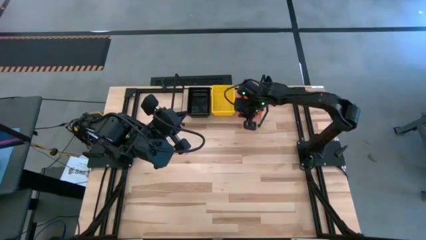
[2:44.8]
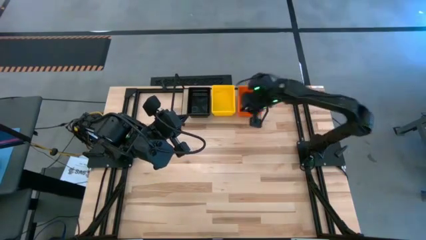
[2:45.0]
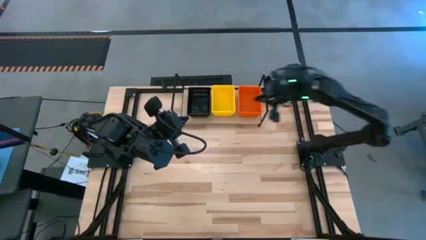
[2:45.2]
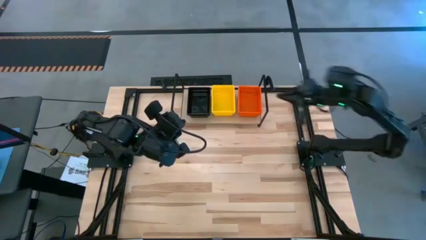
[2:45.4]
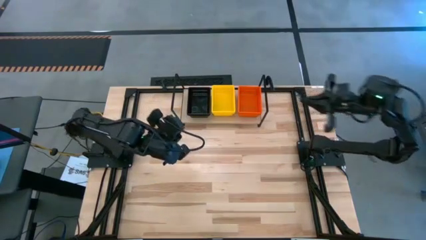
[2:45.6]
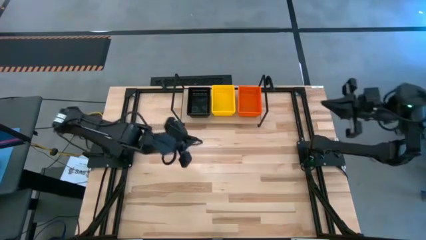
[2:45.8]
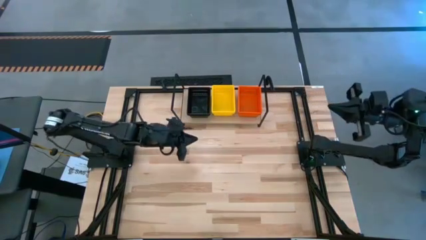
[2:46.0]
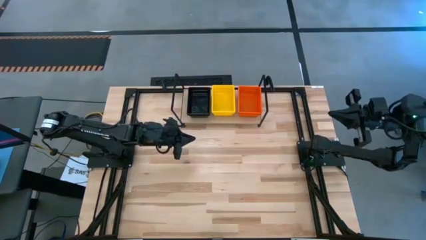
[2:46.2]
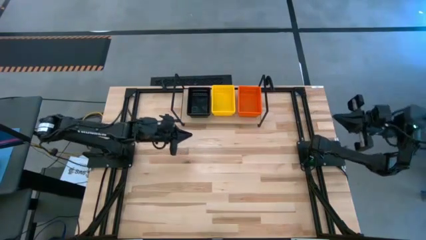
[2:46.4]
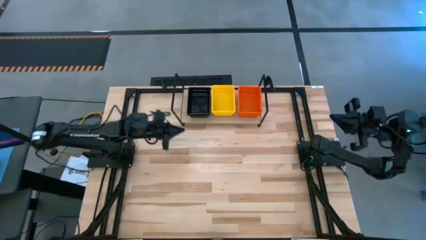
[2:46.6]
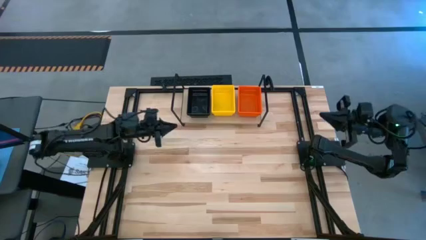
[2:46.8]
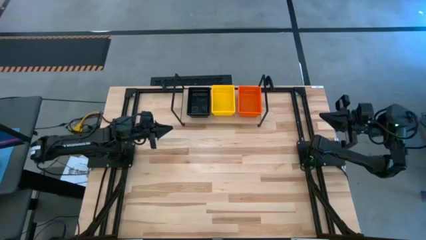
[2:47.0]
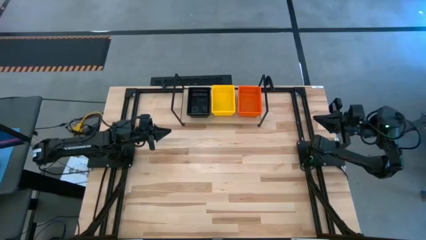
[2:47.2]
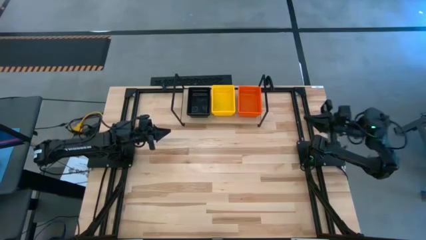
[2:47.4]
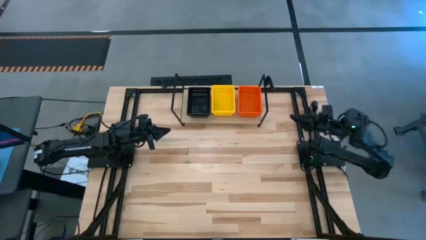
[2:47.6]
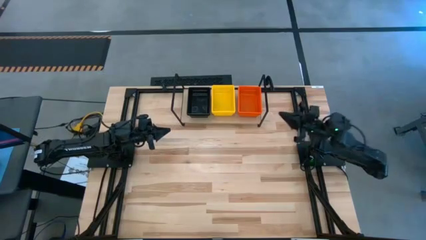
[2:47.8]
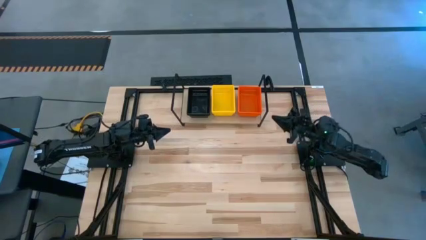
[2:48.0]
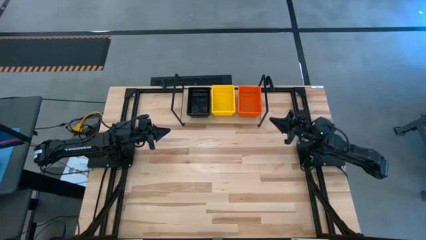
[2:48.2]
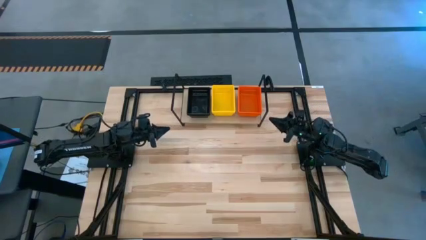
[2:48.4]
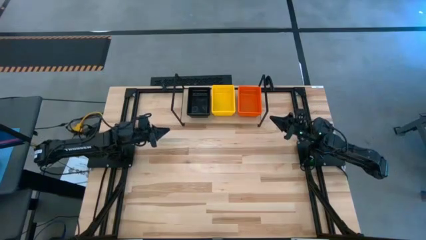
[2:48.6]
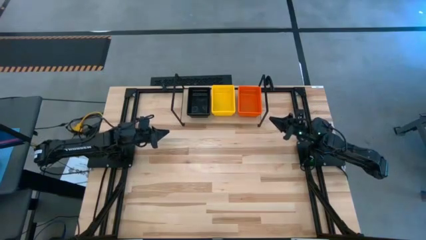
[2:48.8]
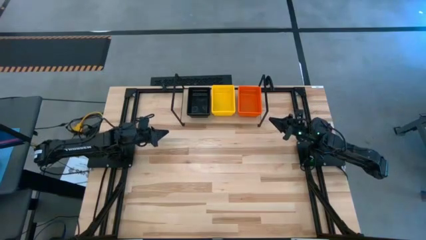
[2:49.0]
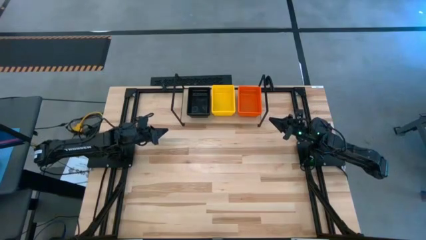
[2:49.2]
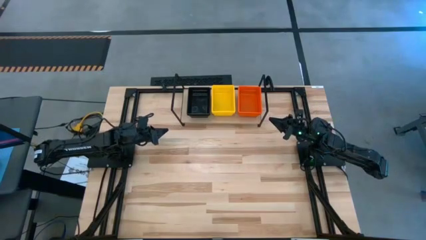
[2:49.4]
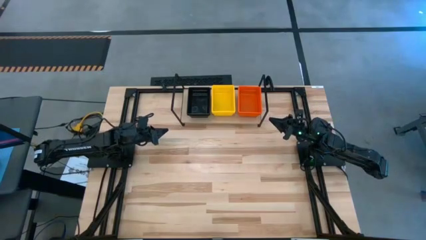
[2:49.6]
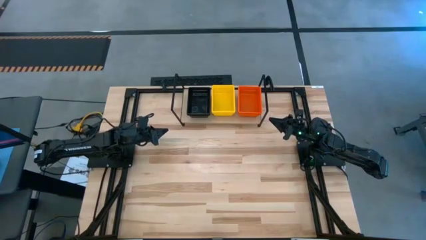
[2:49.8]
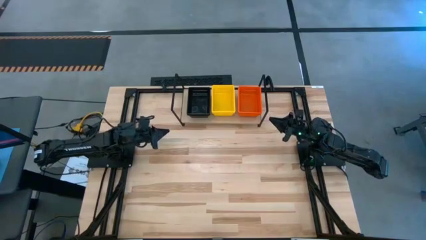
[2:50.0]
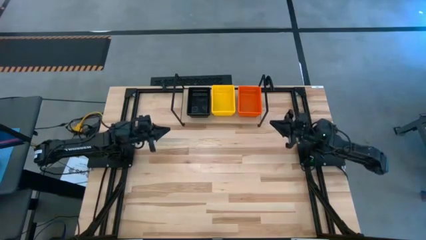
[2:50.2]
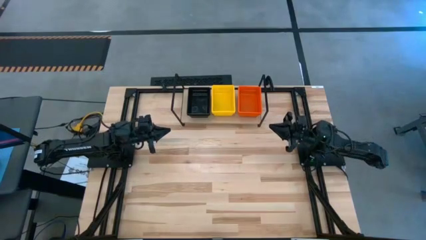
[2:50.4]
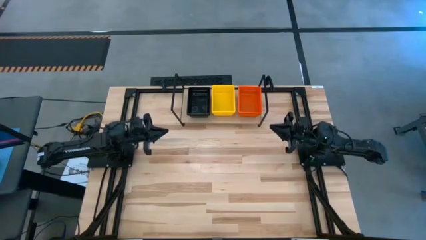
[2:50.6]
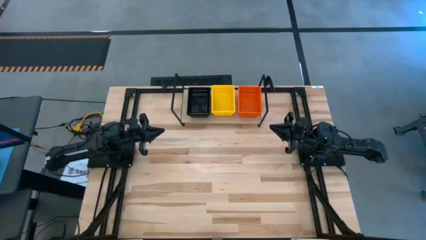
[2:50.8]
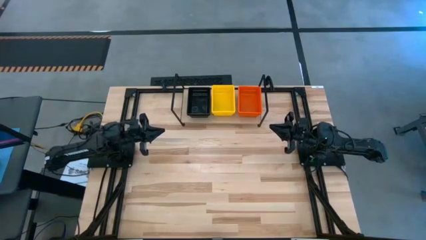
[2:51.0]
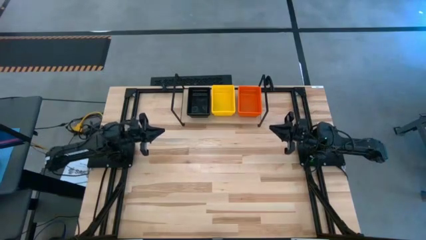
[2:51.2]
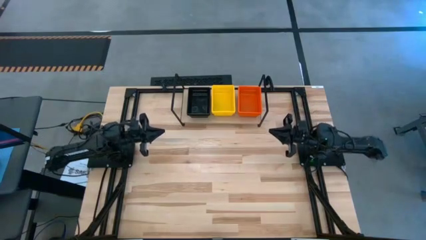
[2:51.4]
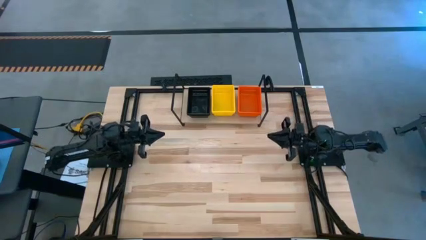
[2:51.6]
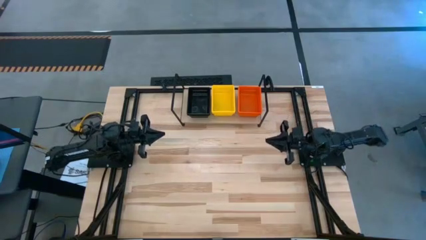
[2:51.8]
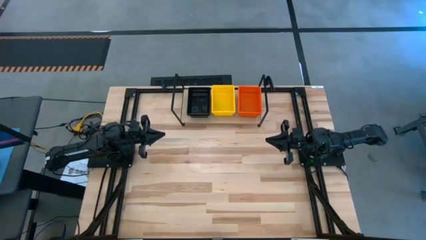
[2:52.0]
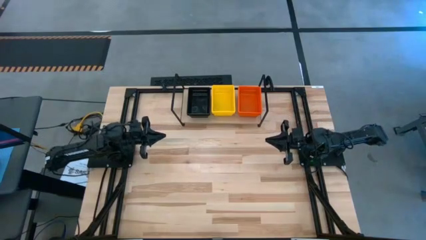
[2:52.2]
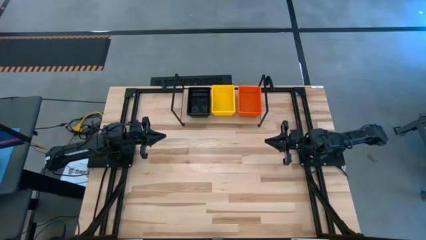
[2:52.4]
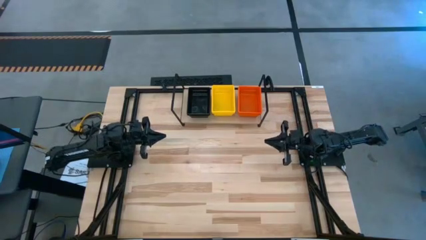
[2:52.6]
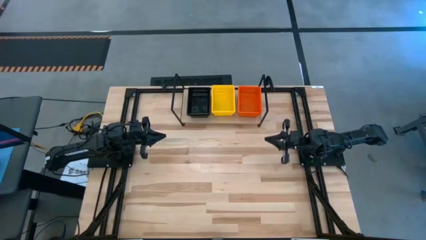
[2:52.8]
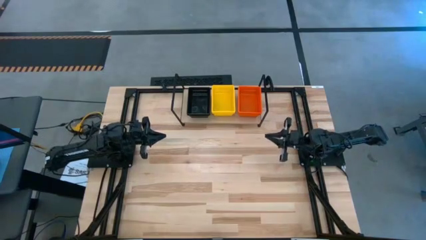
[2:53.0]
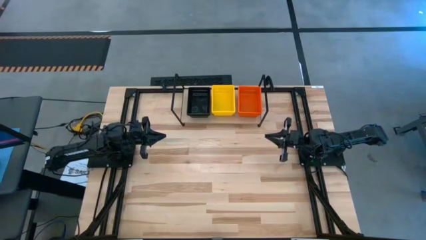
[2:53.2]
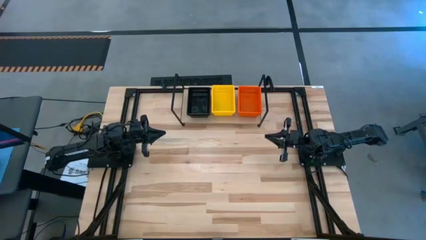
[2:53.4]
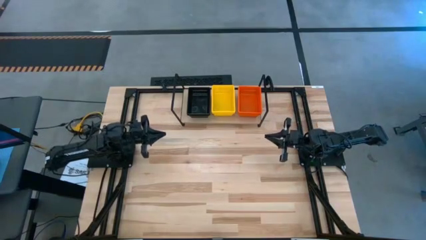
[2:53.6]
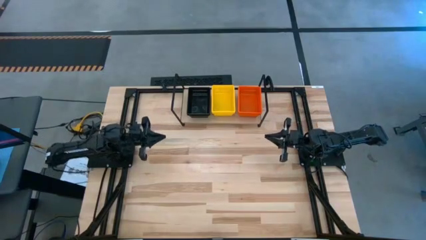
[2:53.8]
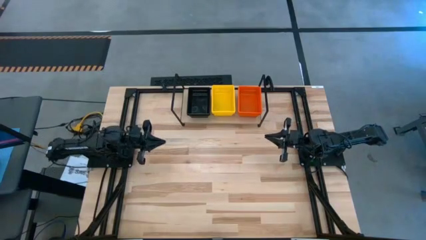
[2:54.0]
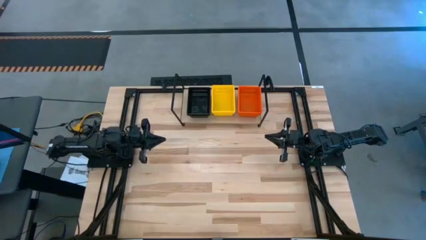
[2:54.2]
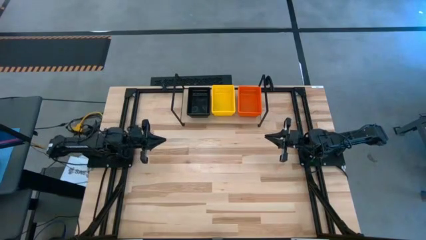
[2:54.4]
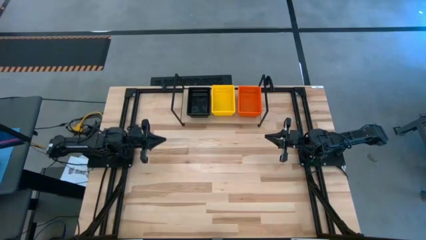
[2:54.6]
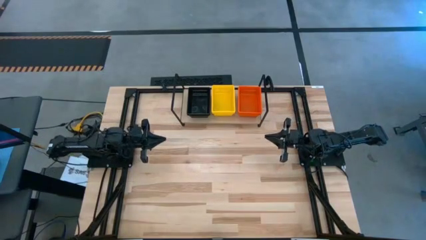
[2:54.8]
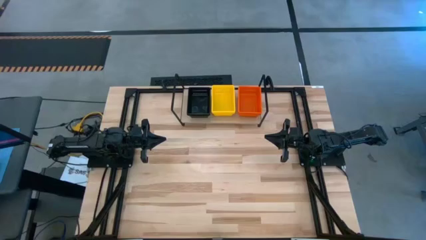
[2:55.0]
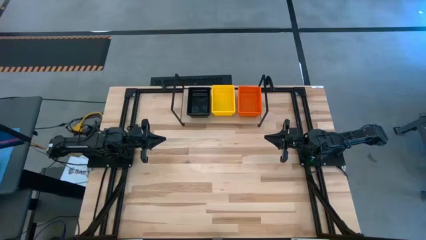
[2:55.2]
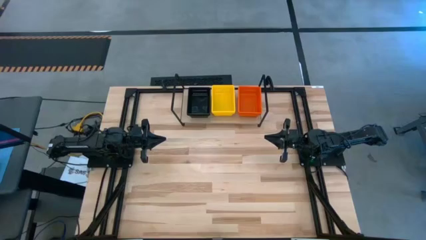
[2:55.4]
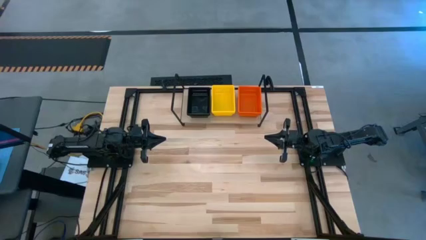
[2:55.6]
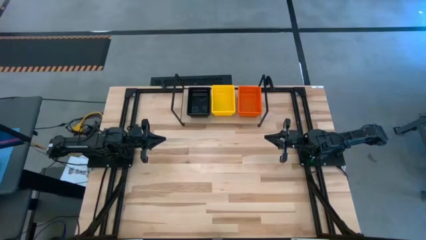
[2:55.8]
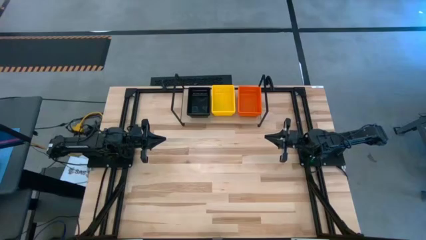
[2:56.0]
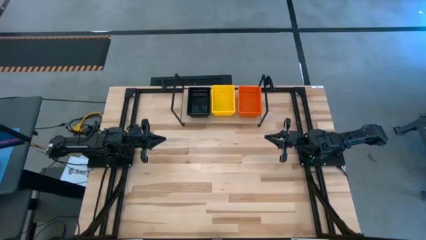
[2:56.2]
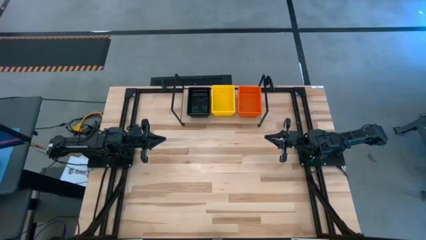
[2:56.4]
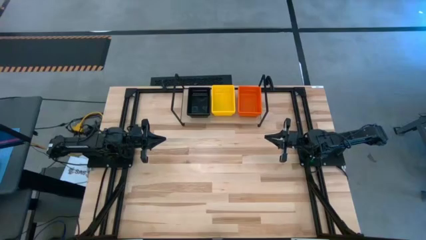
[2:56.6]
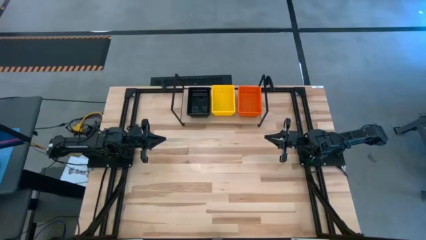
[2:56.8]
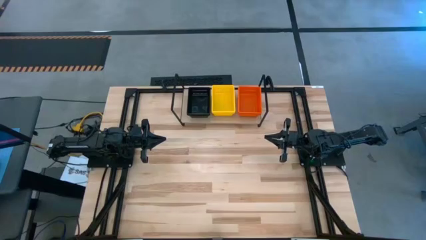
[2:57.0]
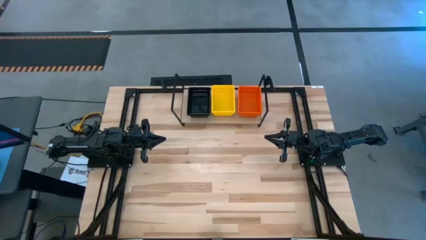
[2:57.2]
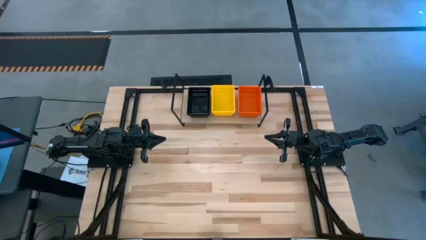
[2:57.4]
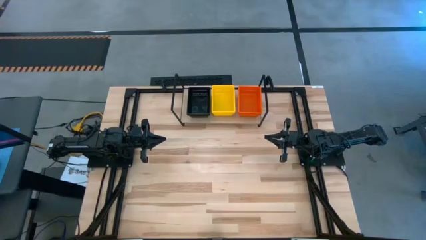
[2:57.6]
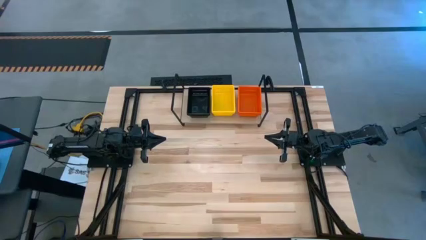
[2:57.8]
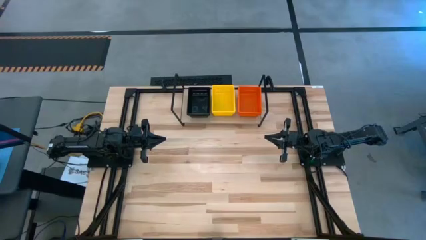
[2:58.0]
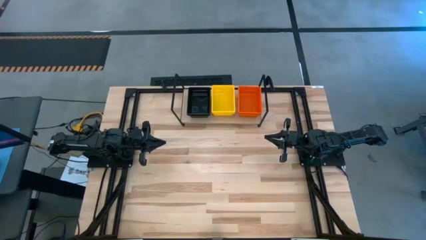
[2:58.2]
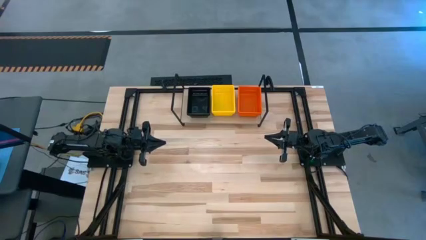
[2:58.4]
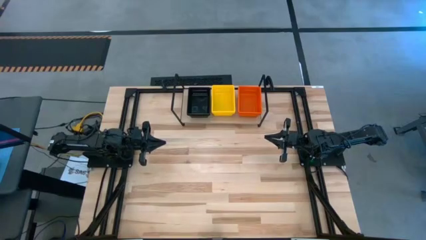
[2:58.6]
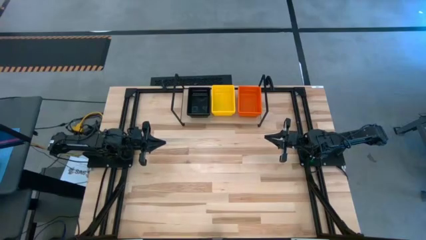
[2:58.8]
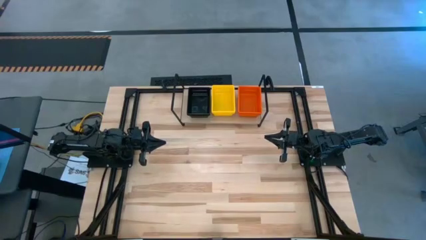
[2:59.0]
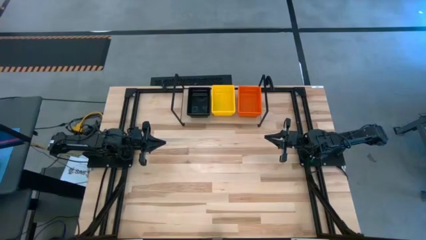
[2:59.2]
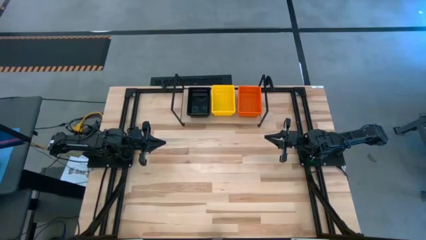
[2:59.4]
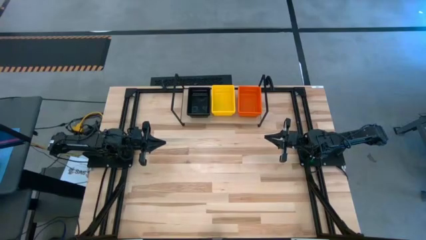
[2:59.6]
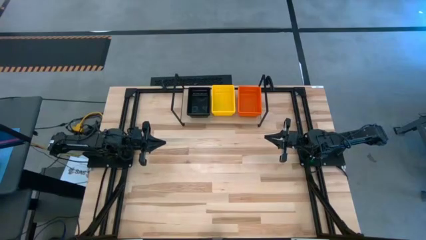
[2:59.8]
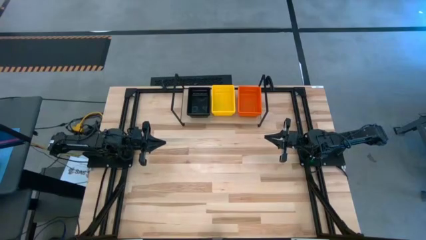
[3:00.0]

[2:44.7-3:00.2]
Task: Stack baskets on shelf by color
Return to Home Position
